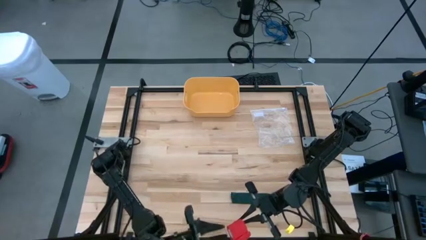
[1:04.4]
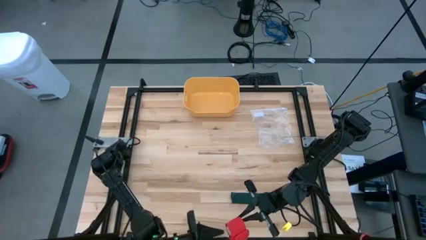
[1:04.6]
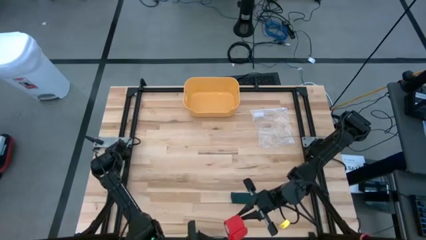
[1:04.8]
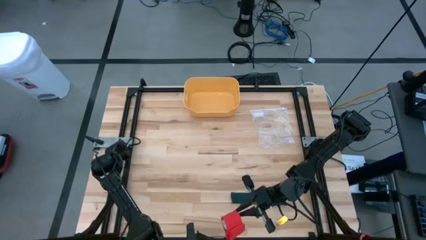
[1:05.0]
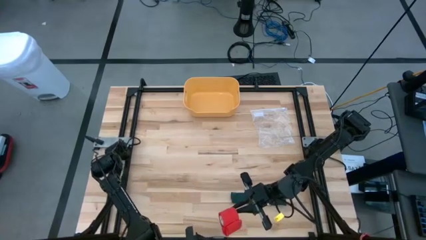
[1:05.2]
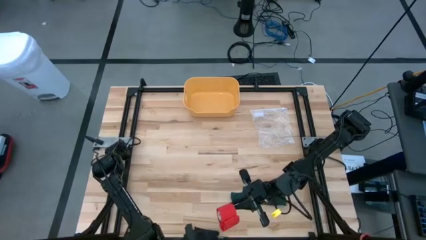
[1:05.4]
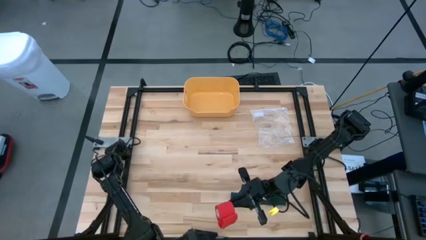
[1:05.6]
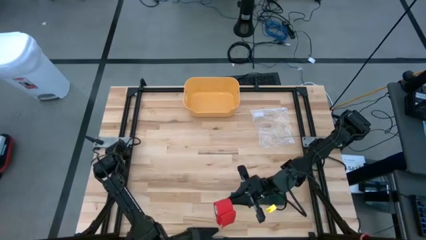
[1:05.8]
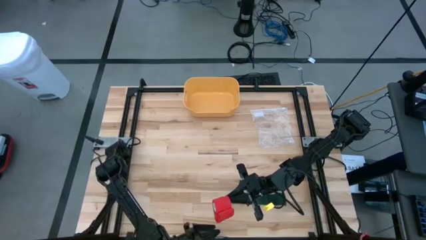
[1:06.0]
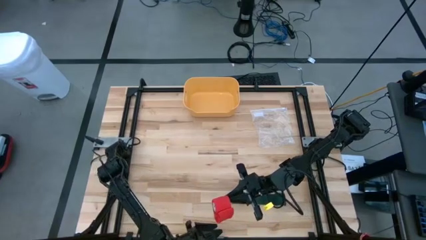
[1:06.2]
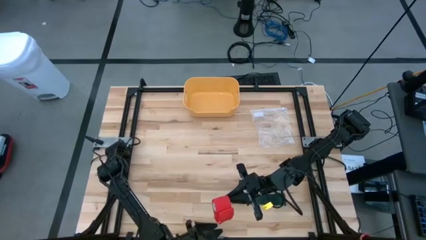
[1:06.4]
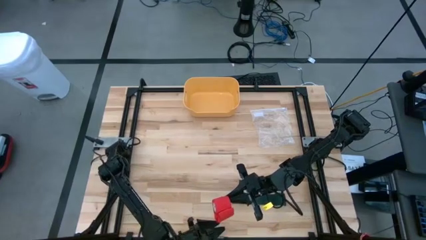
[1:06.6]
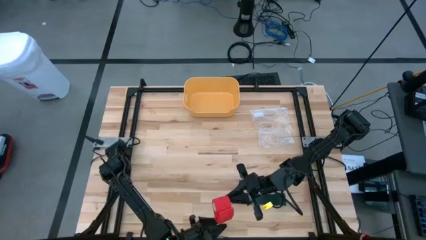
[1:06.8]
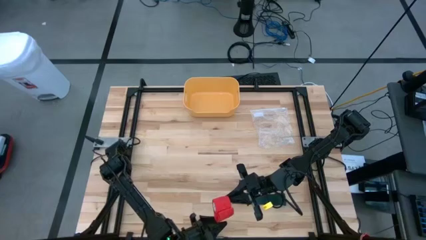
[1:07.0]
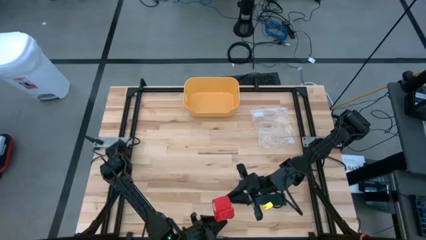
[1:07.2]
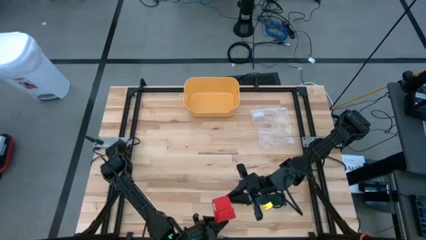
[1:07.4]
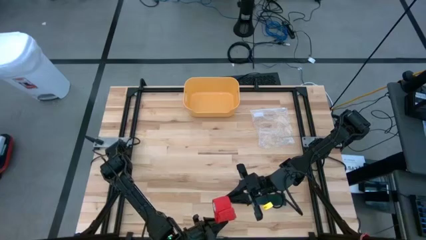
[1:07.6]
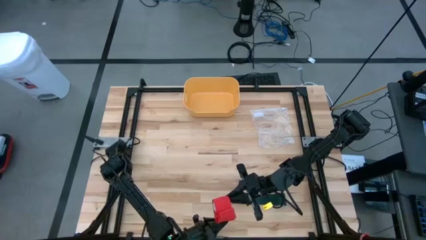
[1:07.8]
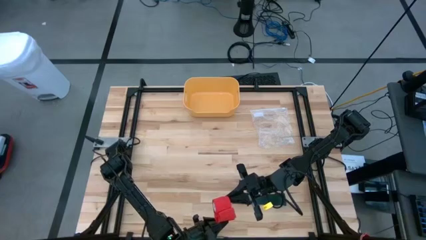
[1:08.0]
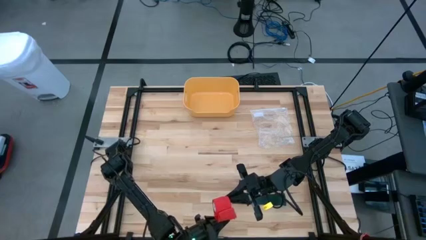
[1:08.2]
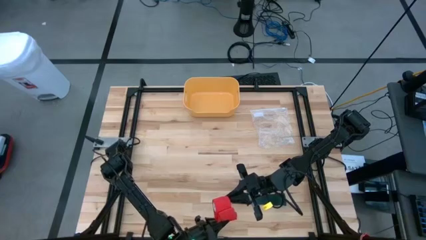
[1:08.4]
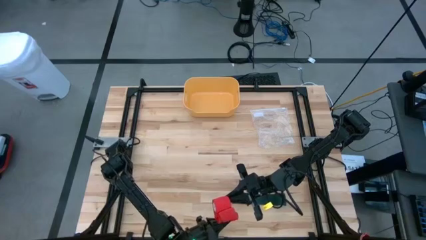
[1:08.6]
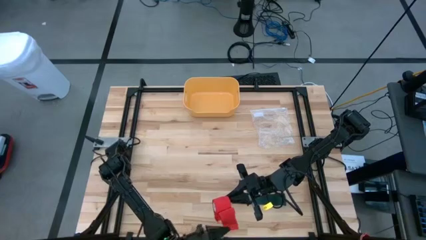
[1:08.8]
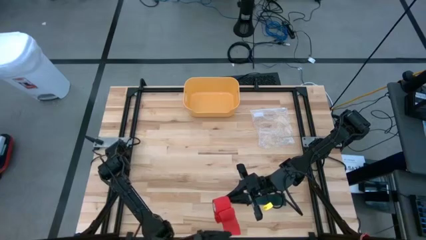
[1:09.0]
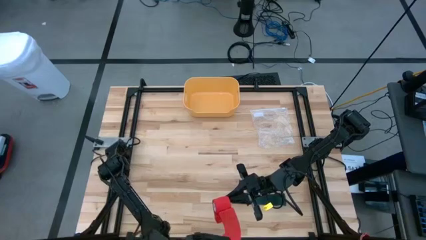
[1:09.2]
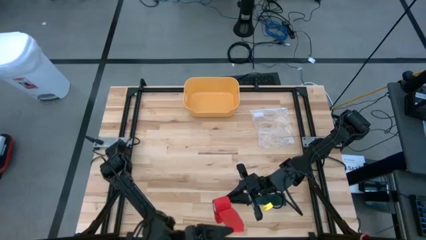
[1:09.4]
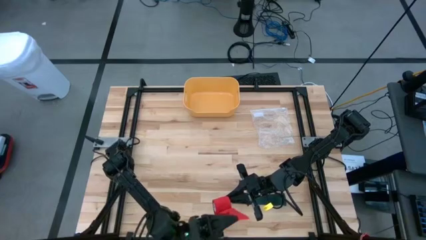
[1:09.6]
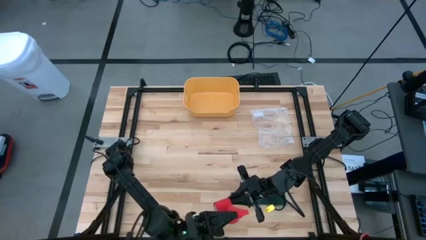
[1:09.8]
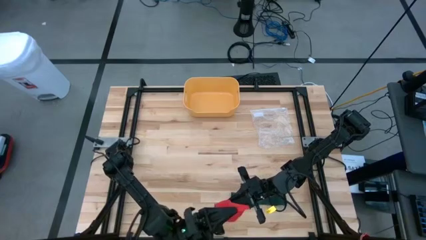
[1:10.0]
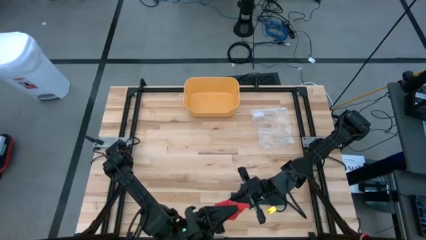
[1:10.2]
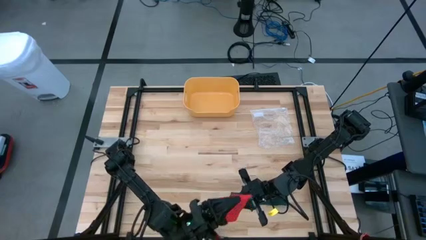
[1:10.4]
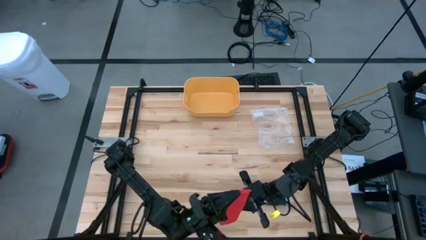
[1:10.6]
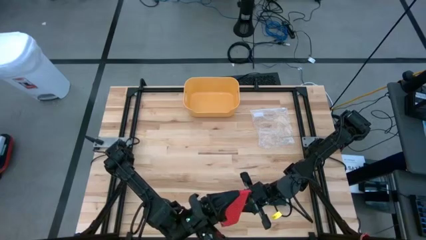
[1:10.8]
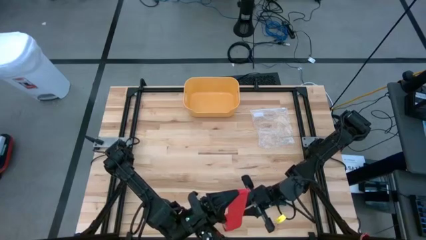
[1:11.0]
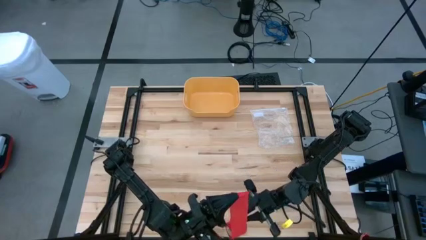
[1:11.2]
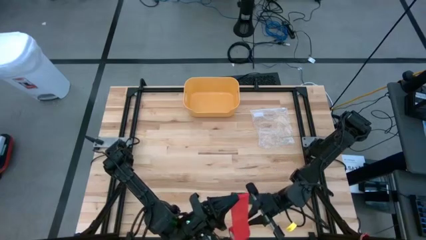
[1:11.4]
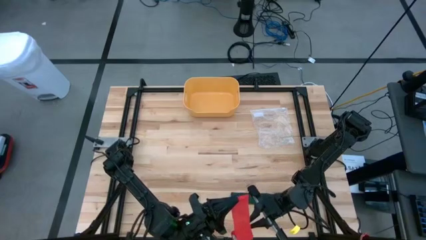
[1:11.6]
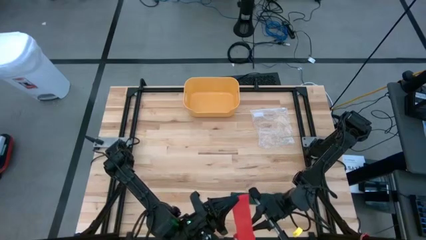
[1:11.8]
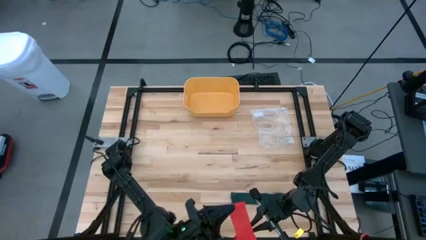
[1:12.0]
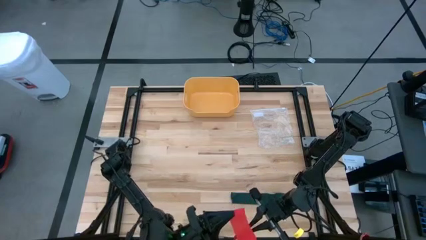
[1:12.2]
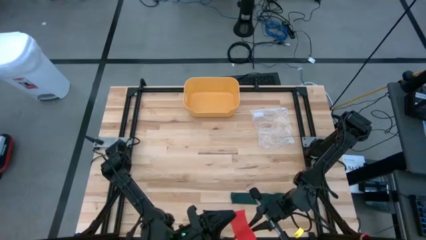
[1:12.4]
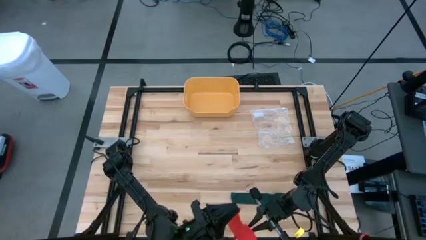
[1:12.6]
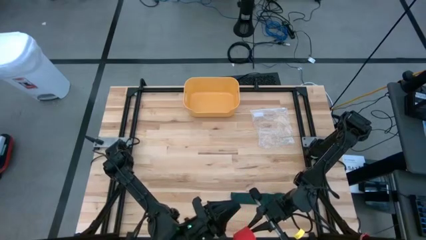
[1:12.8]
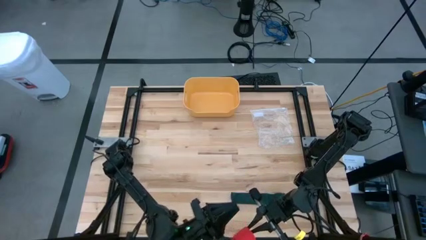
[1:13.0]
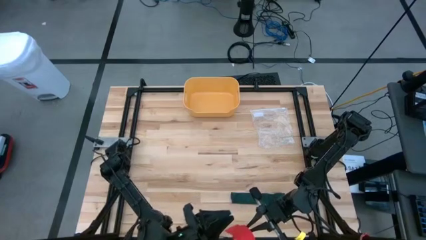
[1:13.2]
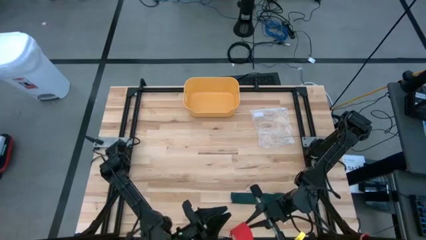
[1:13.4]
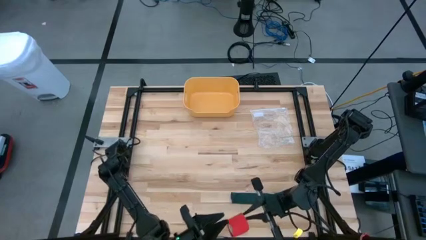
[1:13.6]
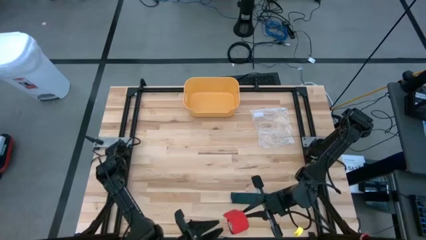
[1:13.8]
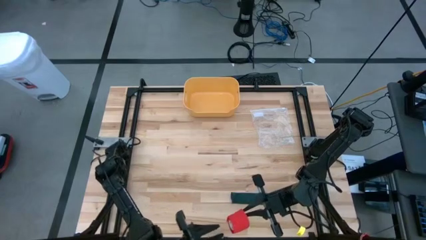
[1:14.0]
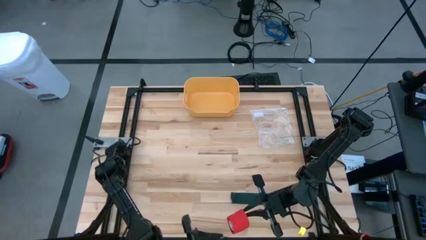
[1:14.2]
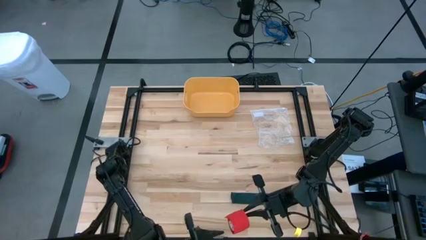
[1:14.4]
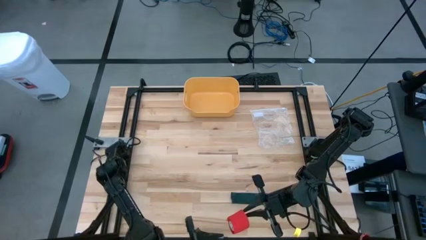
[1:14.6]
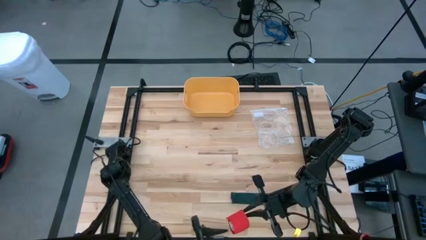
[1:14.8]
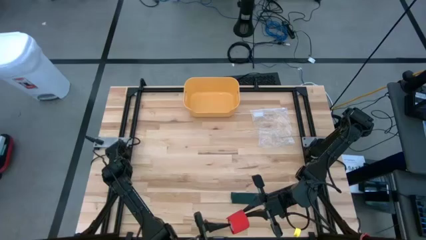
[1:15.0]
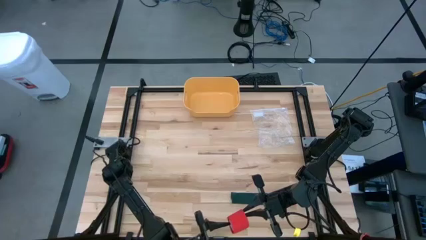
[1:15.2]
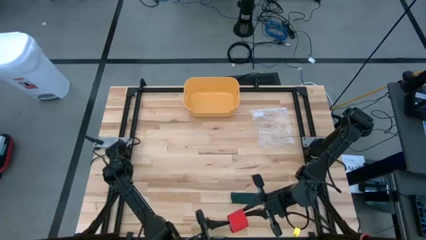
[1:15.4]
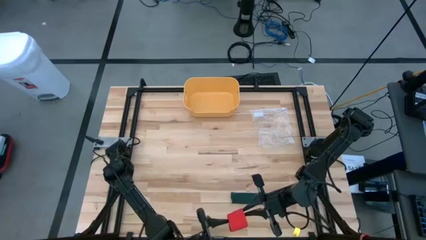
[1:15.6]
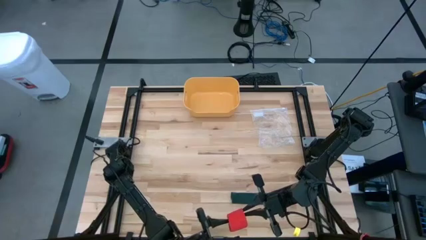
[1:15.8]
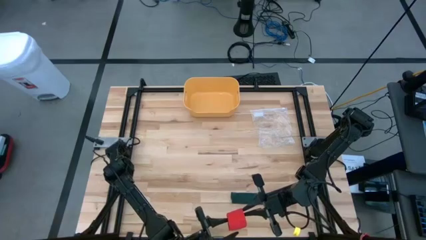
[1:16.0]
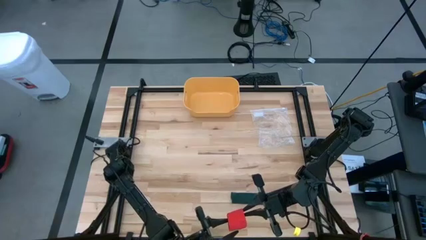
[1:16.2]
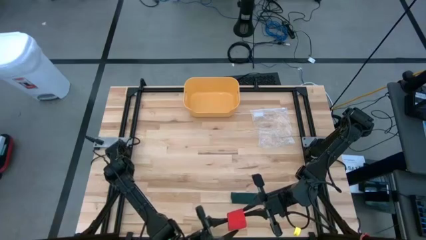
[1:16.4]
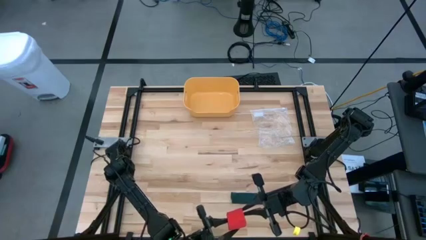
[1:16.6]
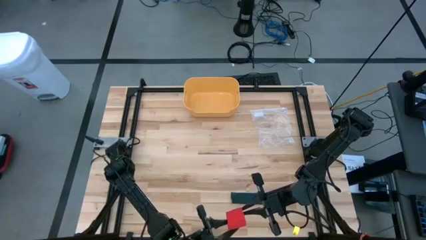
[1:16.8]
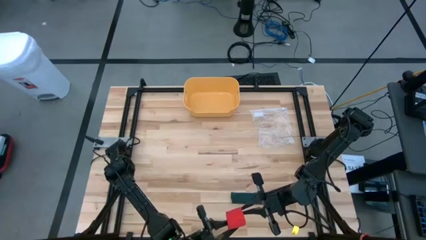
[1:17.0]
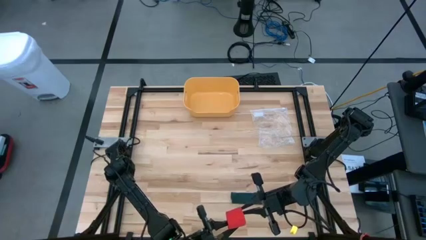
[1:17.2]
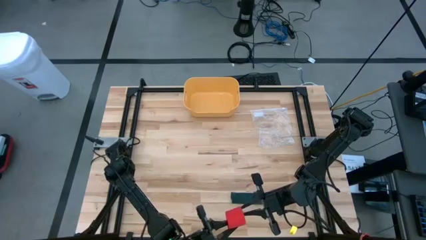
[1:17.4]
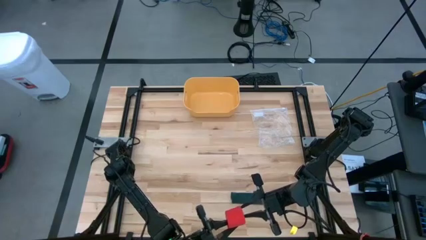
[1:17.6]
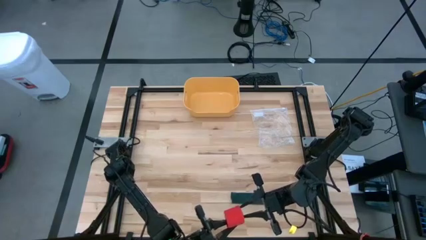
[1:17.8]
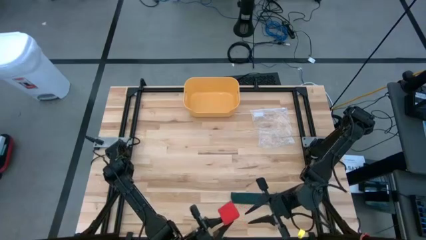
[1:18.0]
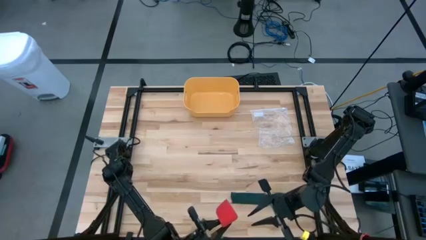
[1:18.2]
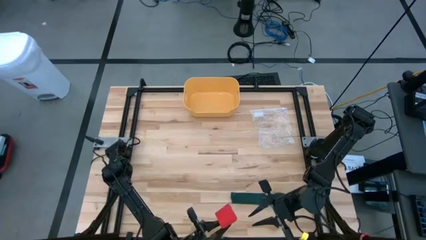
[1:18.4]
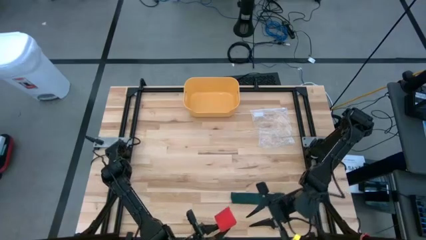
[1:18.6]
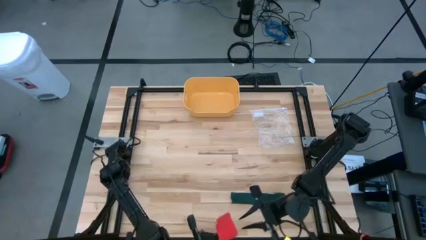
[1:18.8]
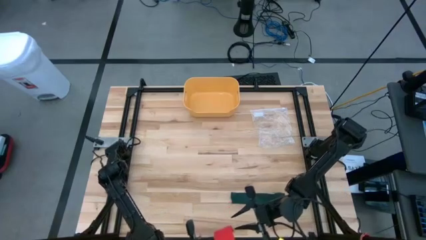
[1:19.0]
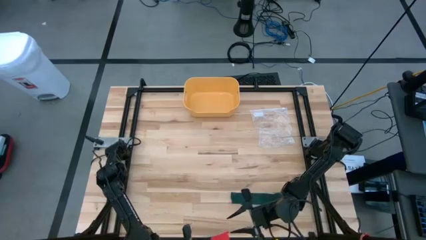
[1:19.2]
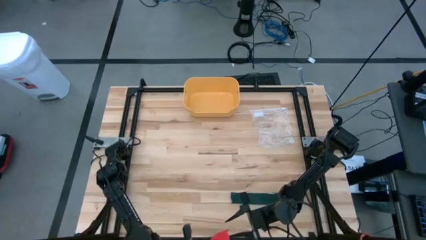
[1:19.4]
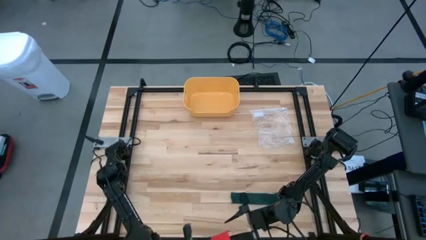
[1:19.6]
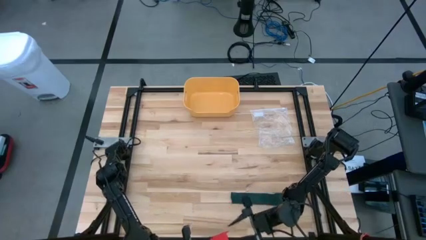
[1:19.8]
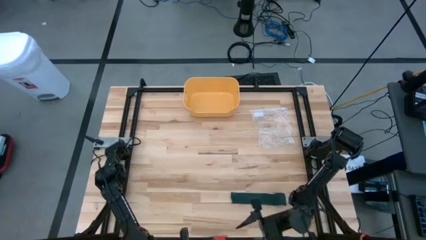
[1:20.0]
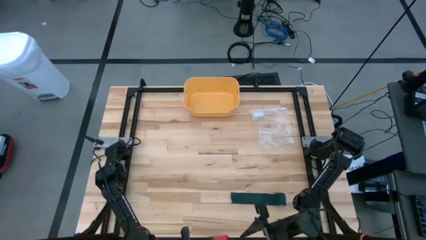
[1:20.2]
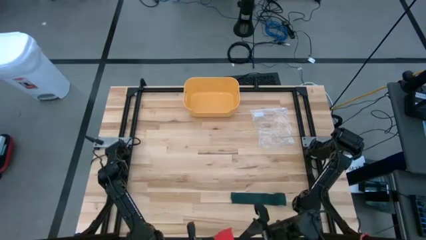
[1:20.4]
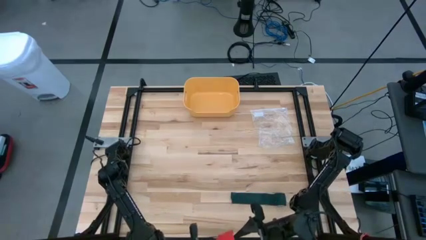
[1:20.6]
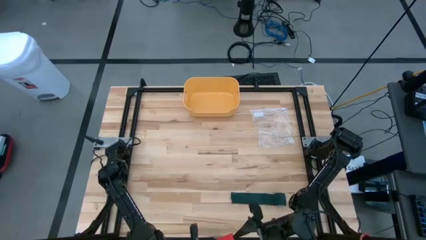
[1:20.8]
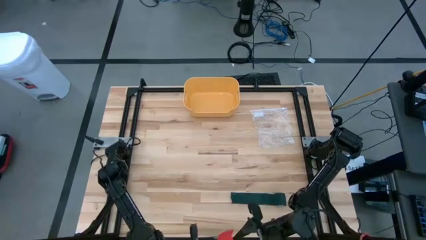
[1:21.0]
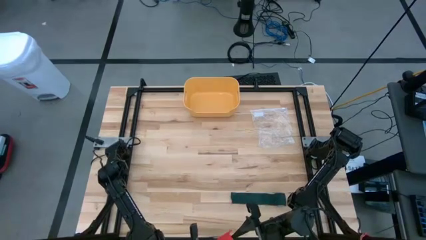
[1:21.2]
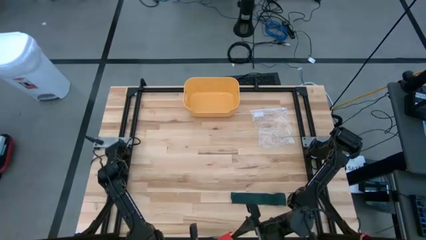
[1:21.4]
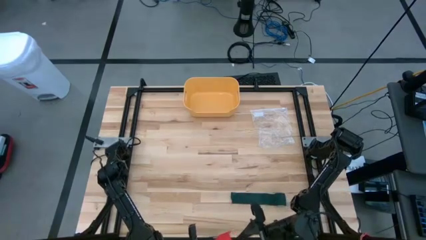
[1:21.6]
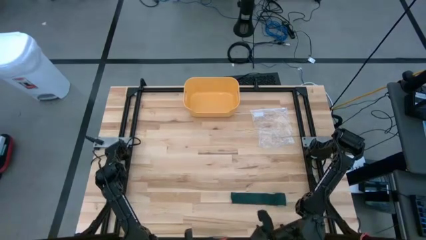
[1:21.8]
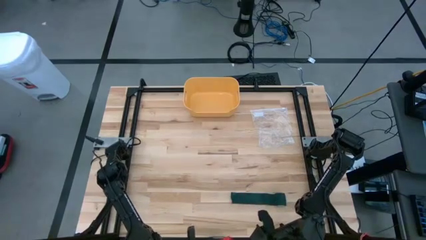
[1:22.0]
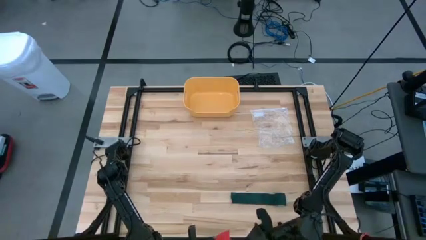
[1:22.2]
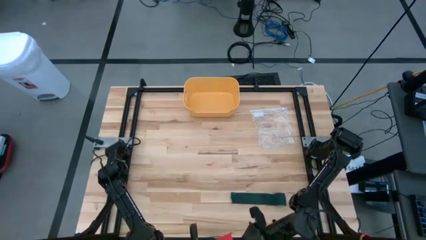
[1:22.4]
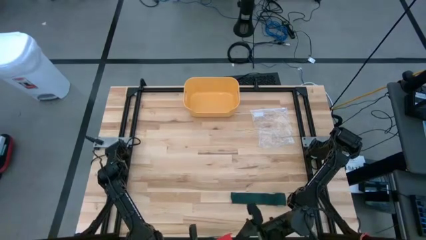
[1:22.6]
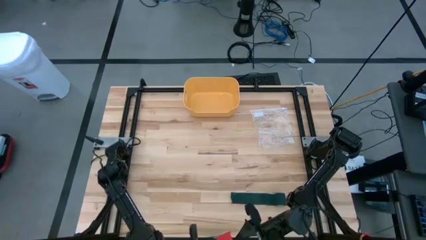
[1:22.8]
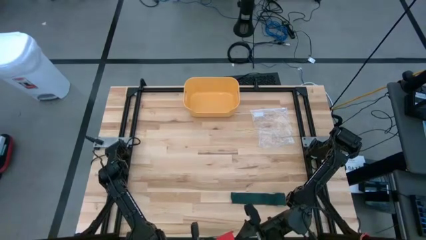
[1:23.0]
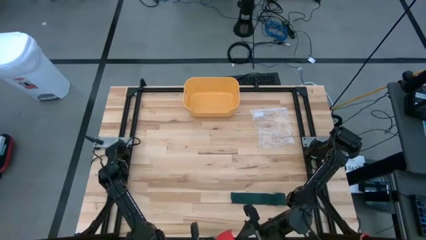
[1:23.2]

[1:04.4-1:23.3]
Task: Roll bandage
Roll the red bandage
